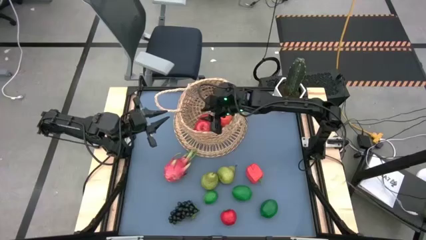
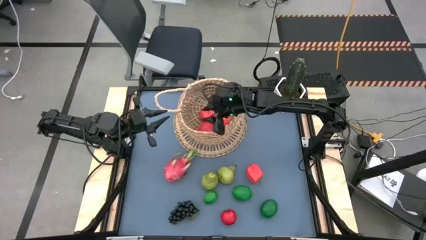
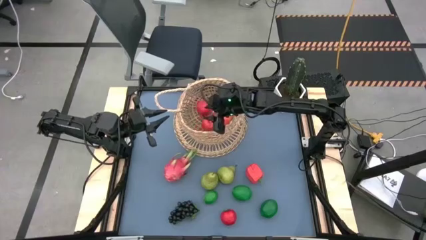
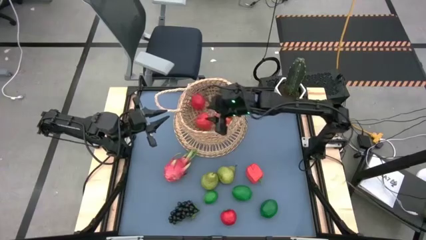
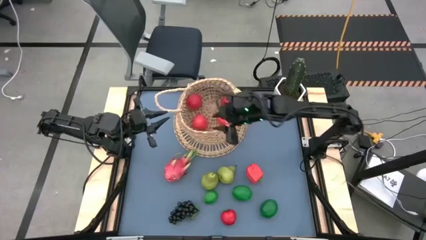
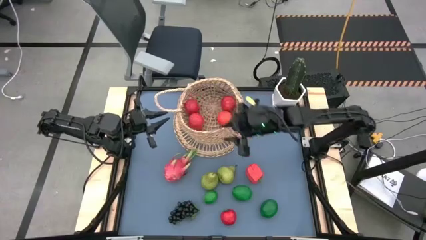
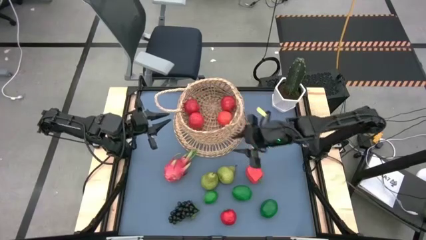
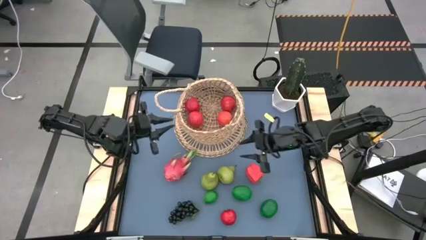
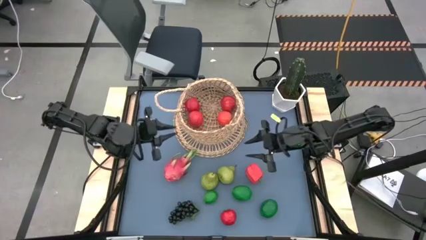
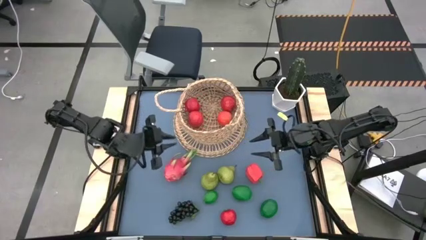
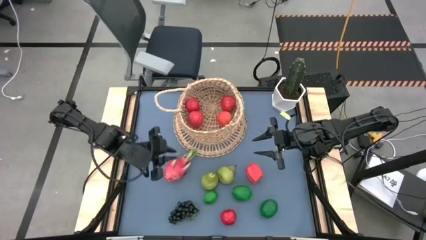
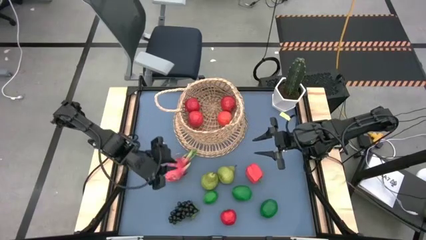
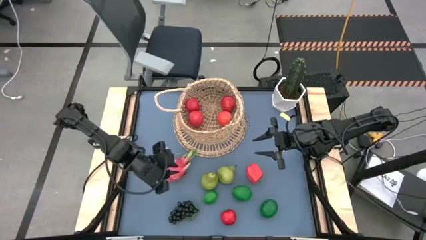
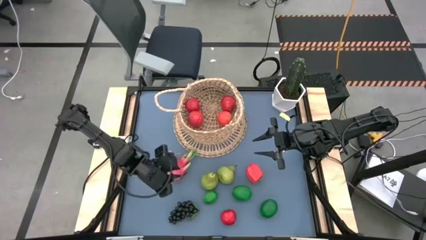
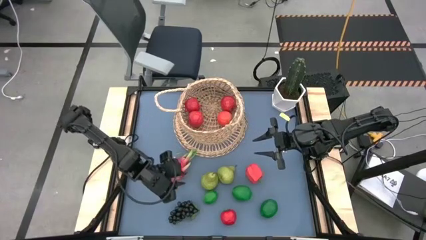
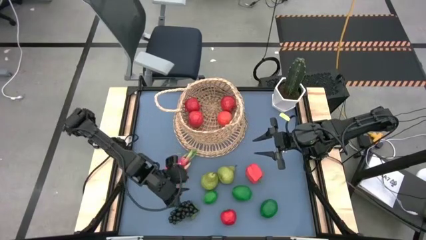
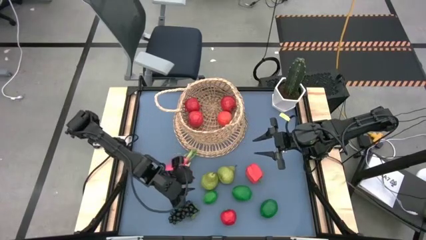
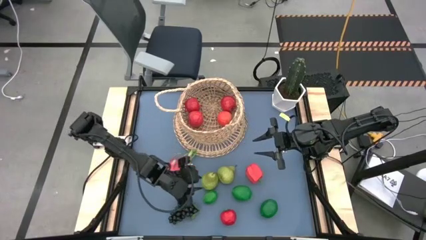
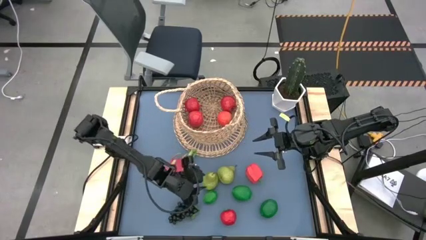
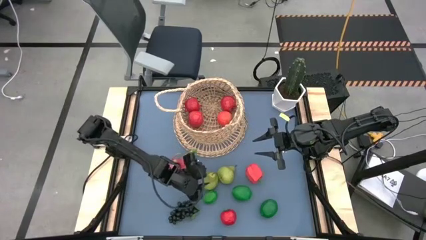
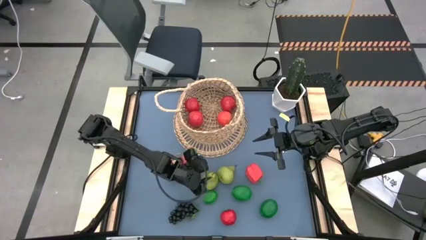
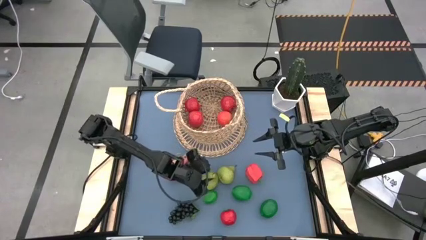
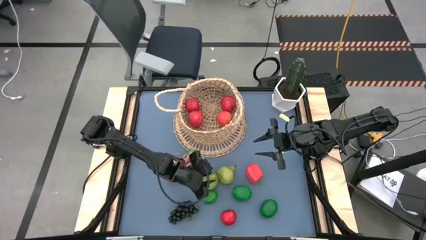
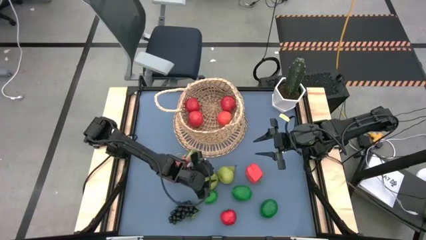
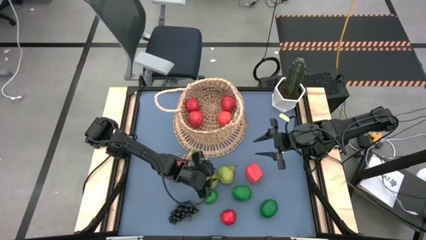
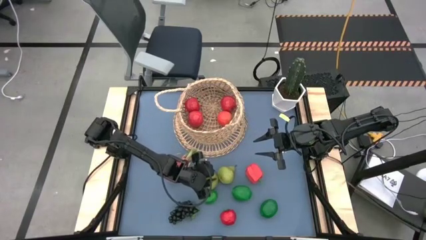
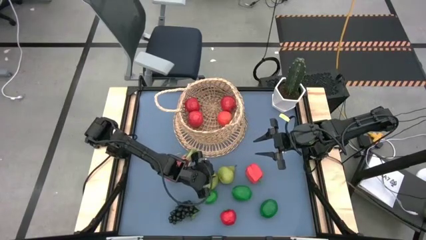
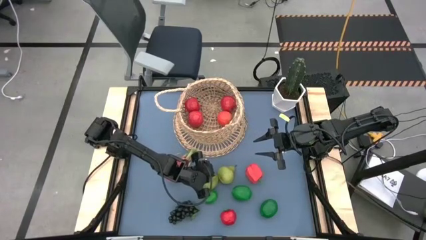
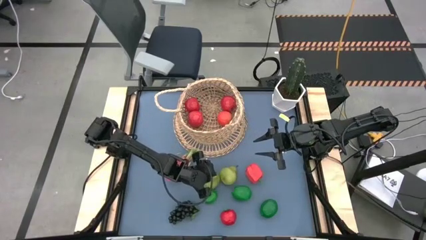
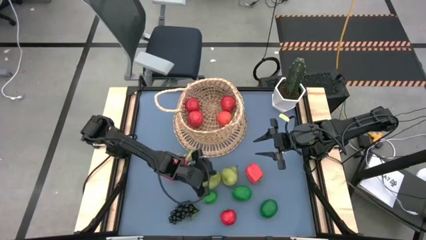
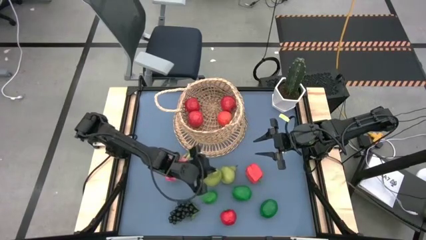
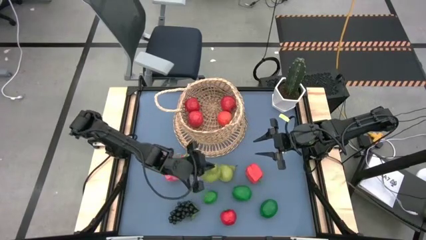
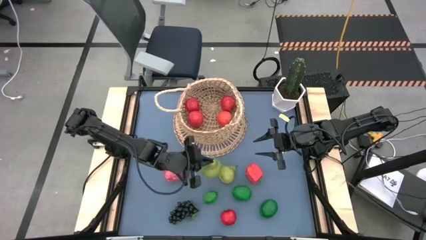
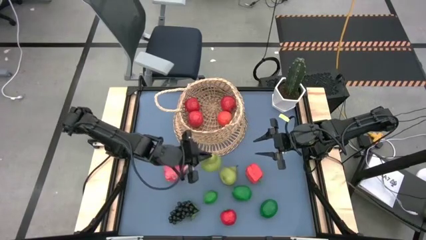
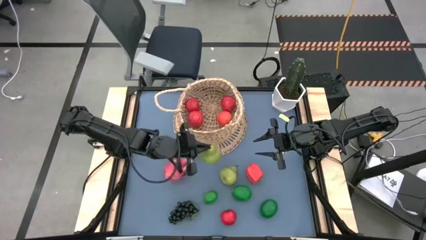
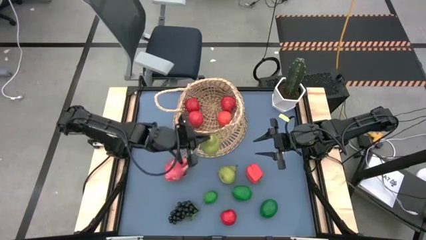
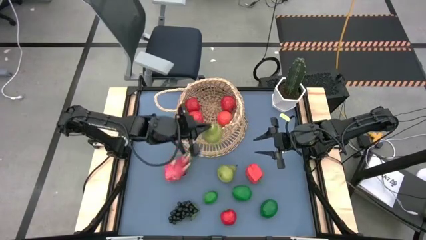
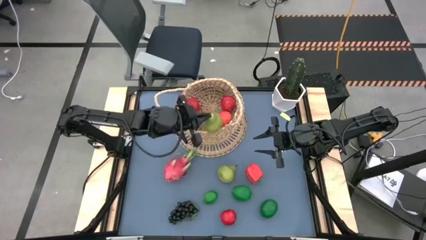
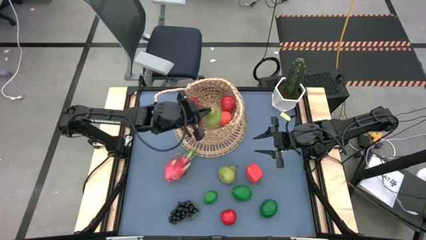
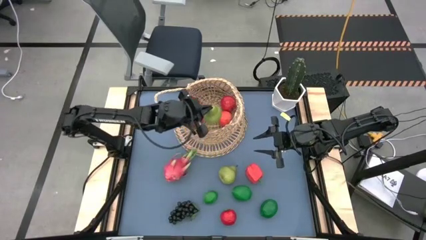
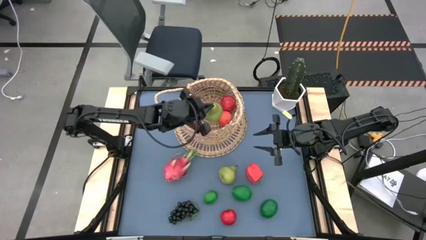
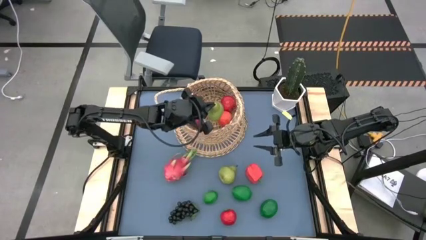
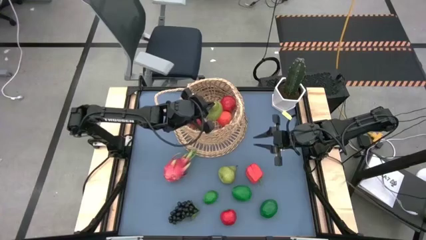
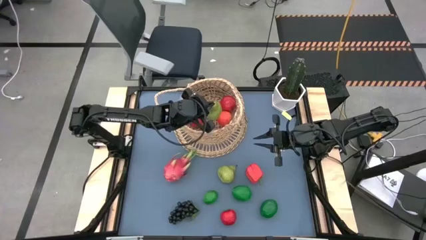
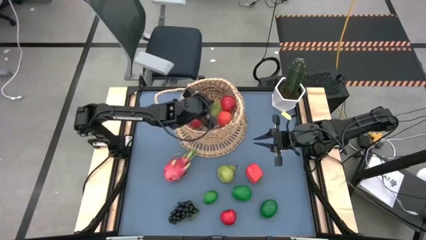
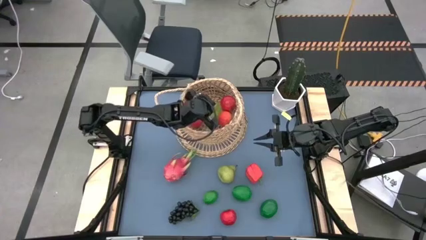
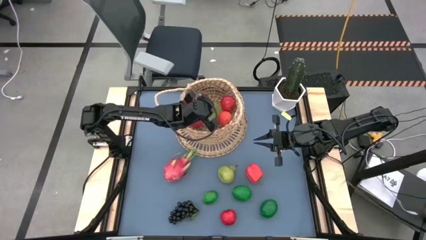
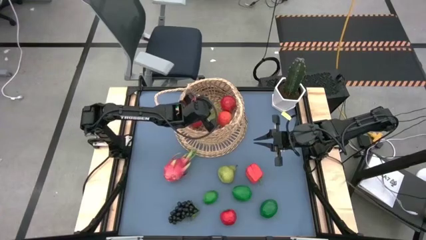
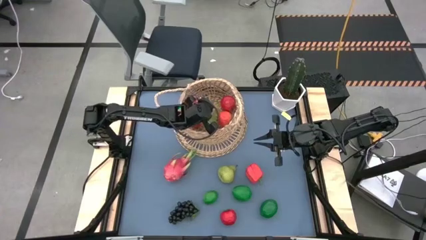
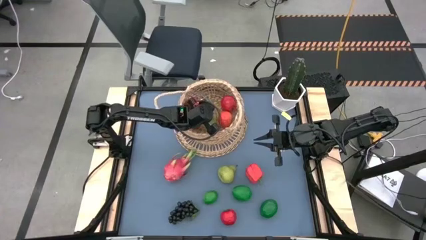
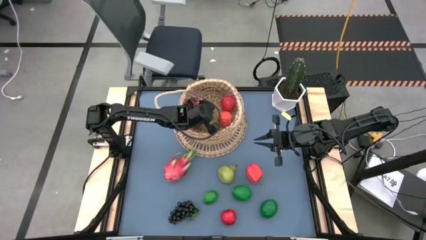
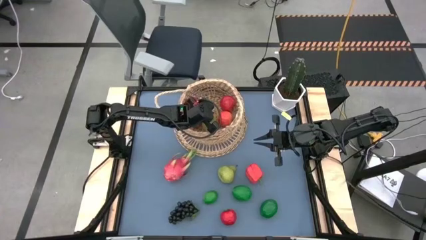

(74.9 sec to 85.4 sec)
Task: Build produce basket
Put the pear into the basket

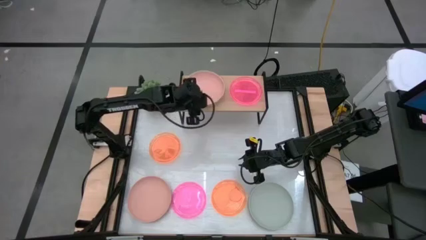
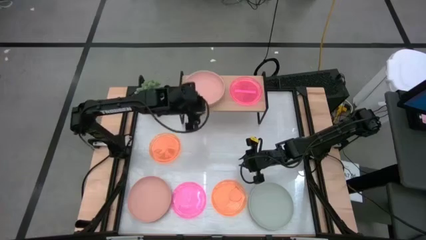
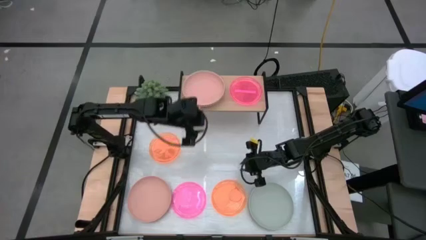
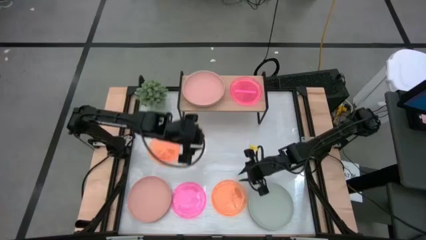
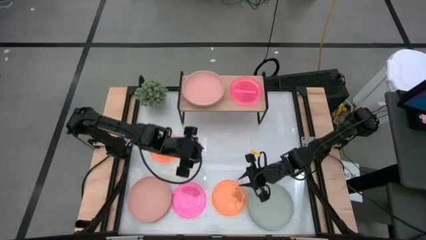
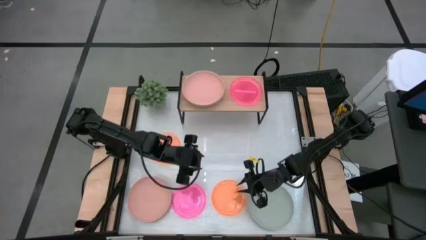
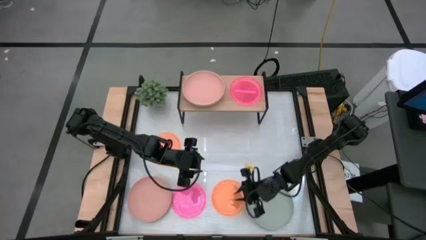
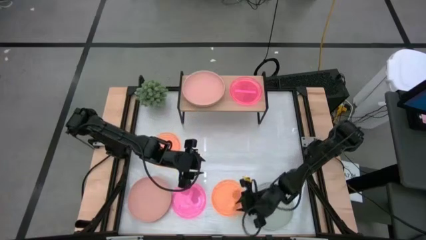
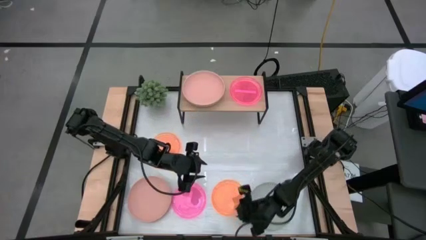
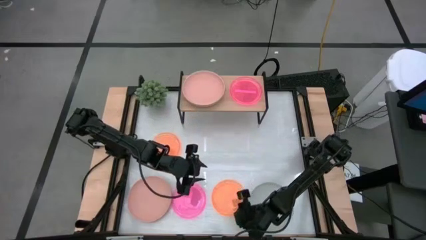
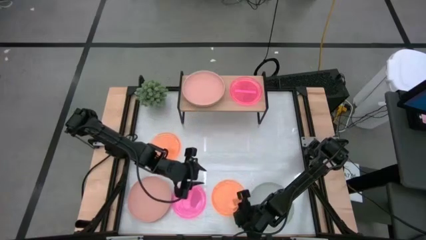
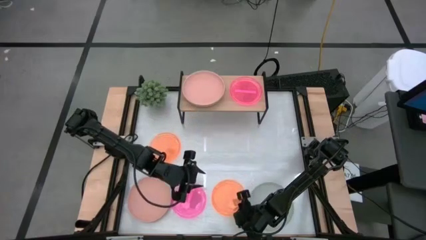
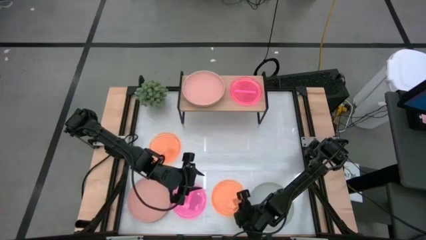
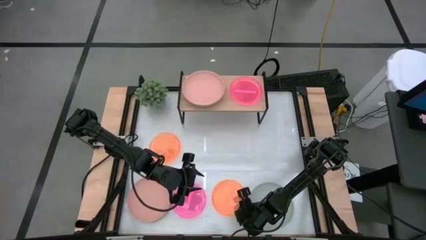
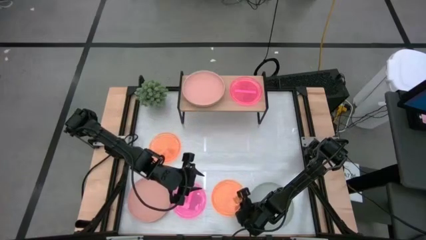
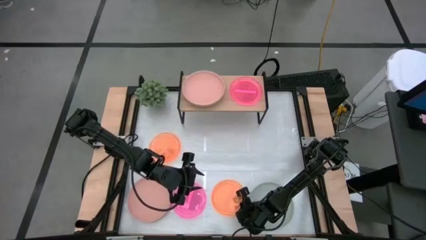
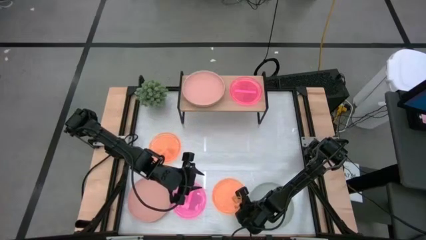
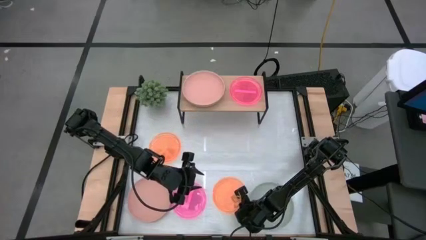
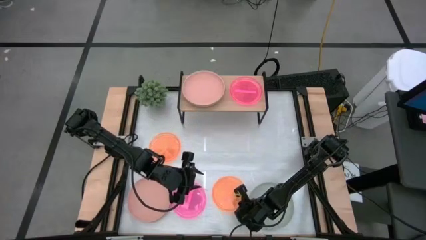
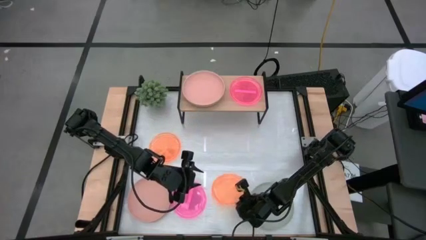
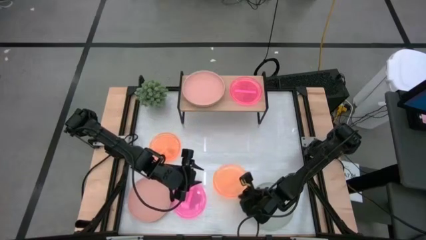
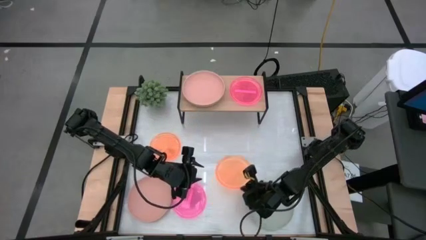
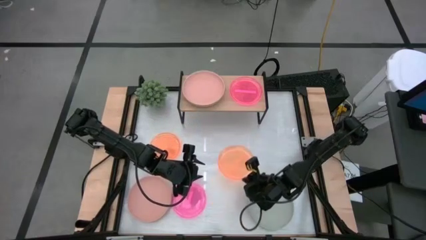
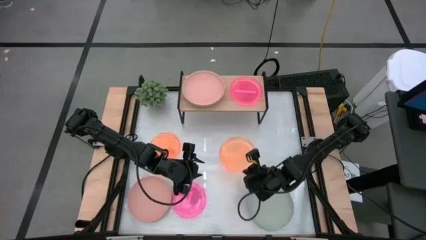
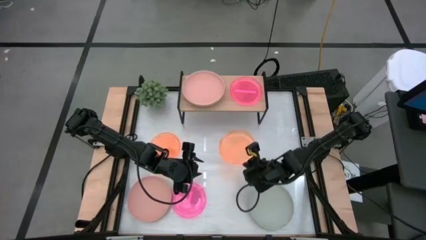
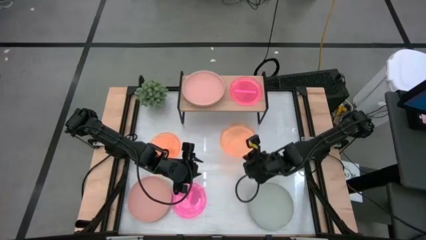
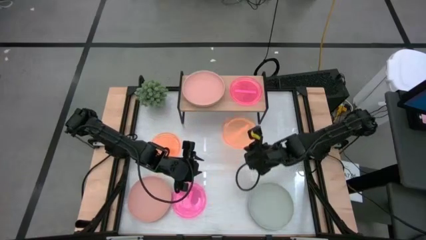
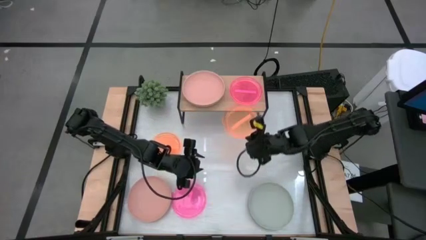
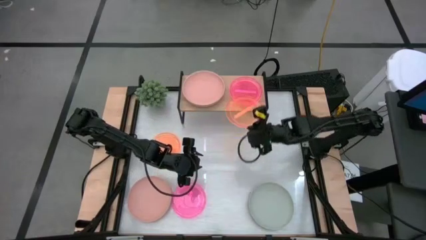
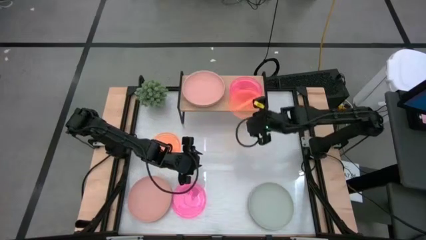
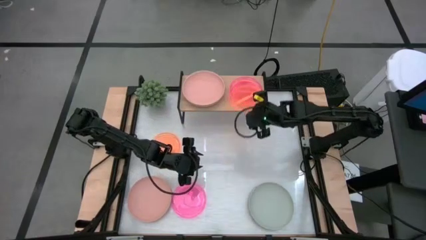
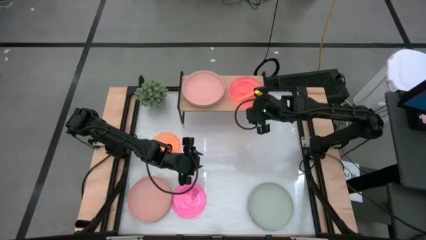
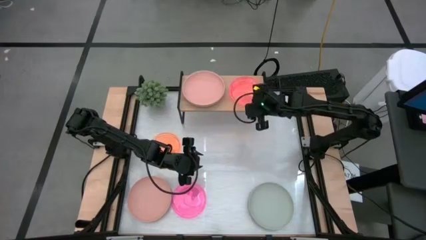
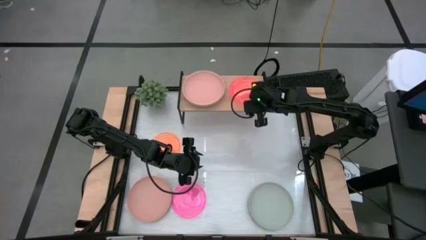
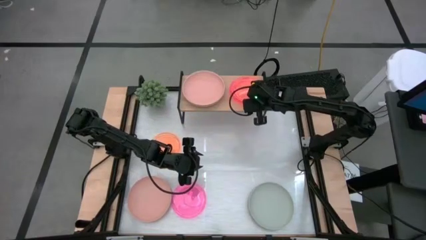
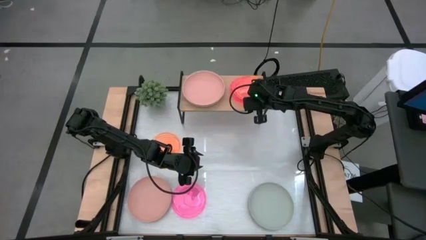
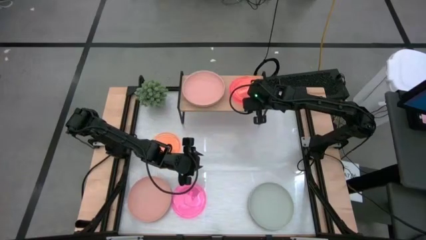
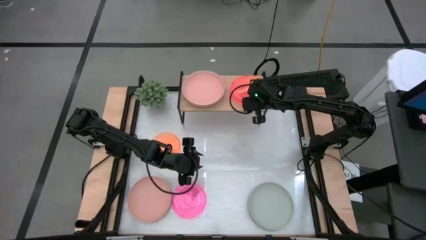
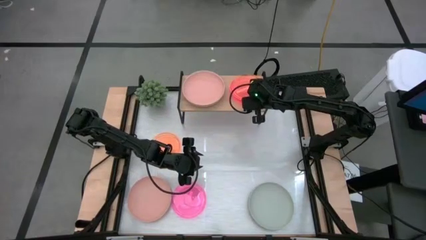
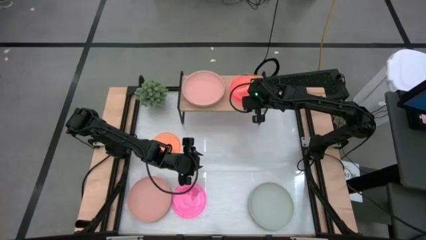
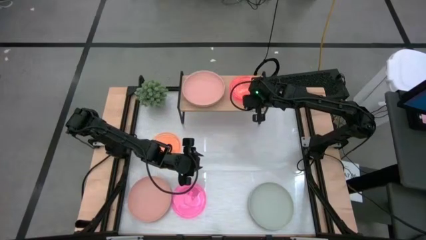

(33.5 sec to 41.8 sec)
Task: Place and stack plates onto a shelf
Stack the bottom orange plate on top of the pink transparent plate
